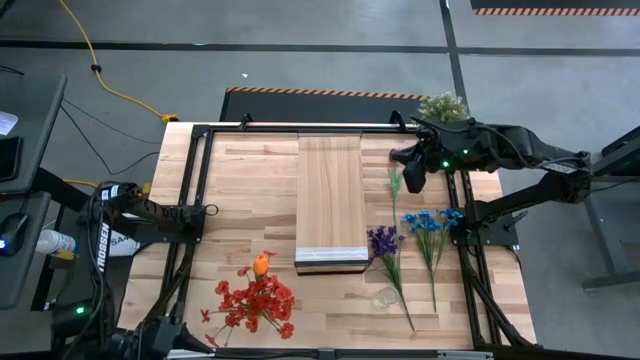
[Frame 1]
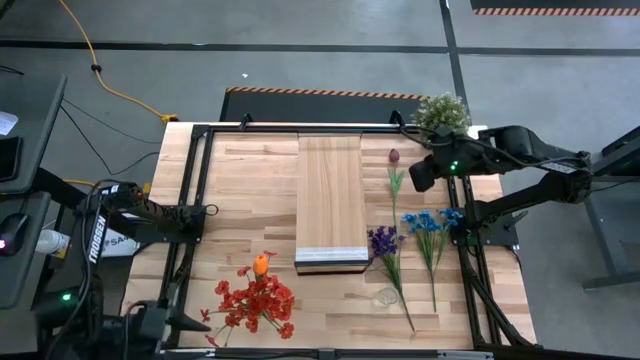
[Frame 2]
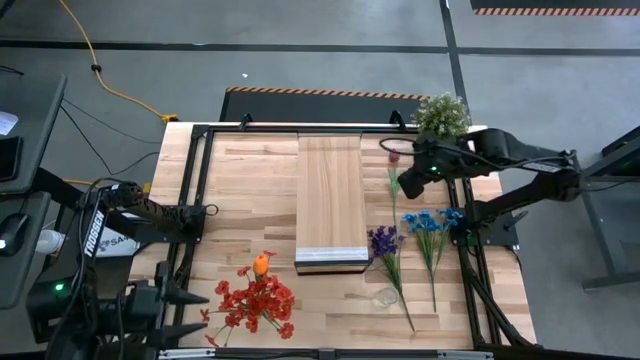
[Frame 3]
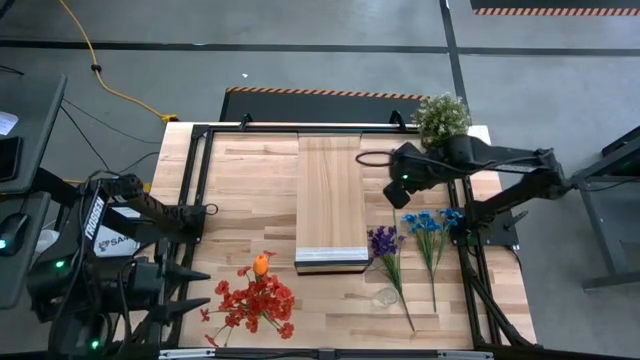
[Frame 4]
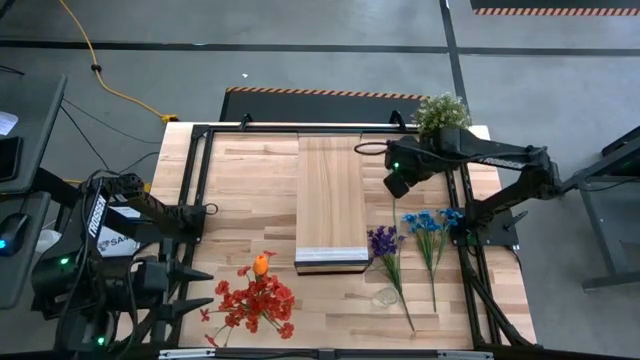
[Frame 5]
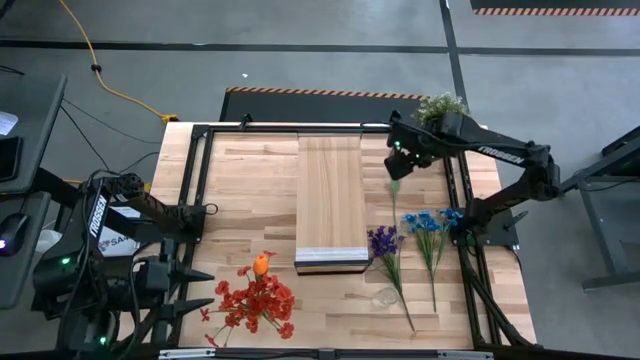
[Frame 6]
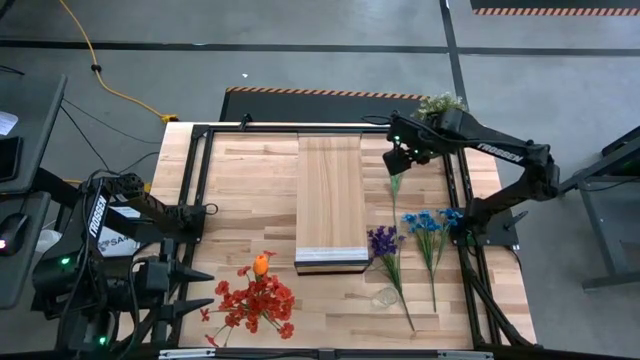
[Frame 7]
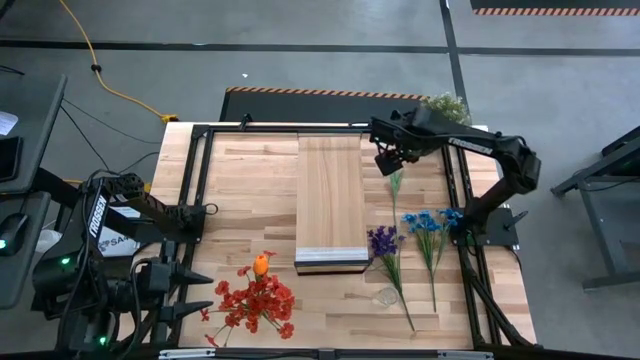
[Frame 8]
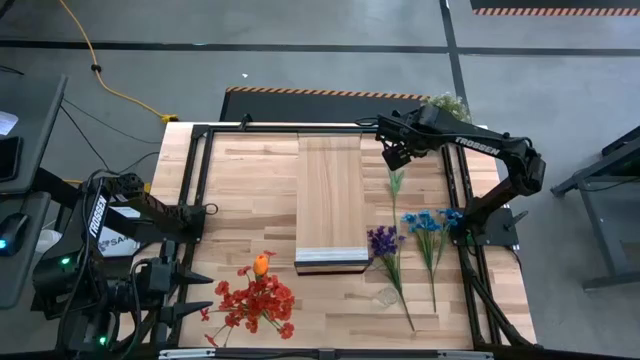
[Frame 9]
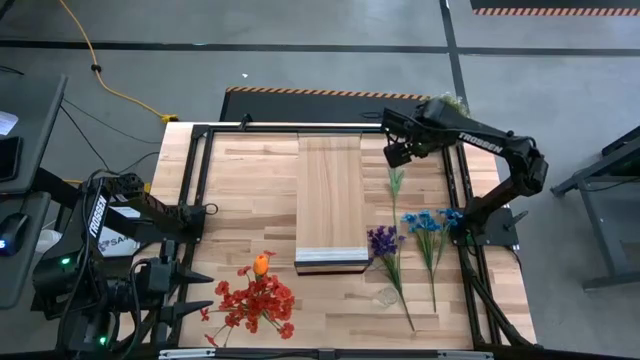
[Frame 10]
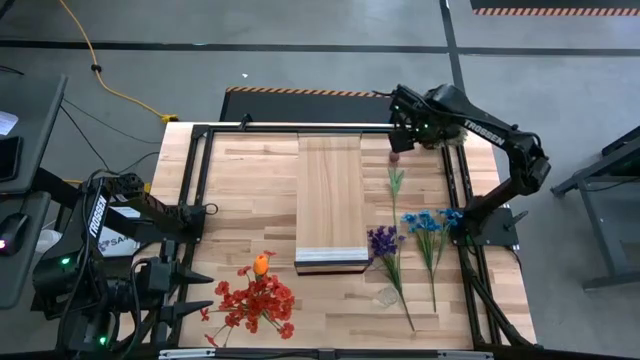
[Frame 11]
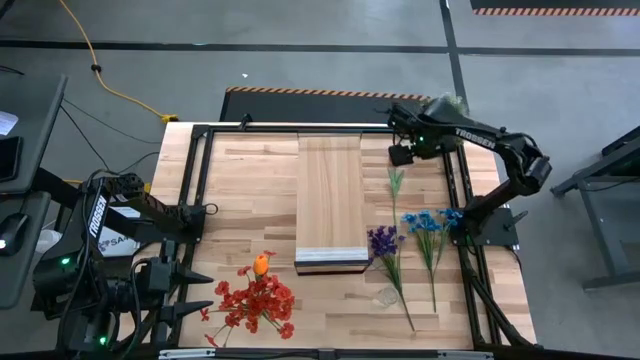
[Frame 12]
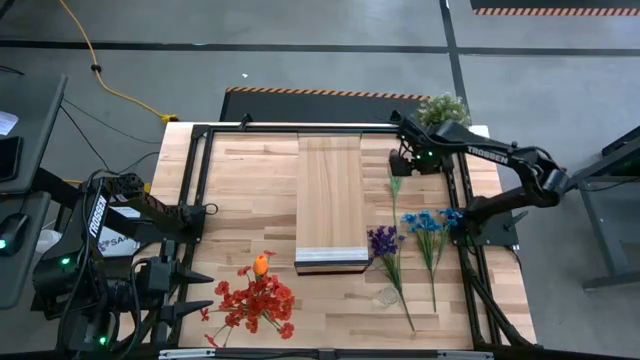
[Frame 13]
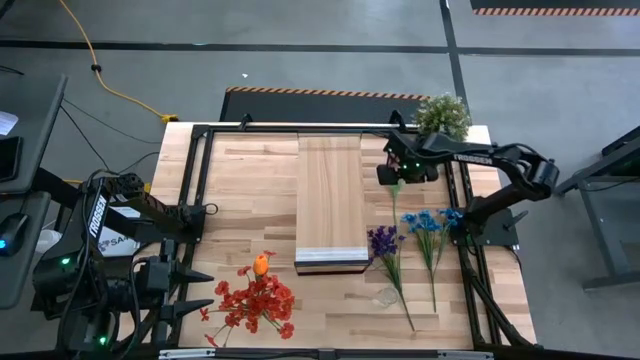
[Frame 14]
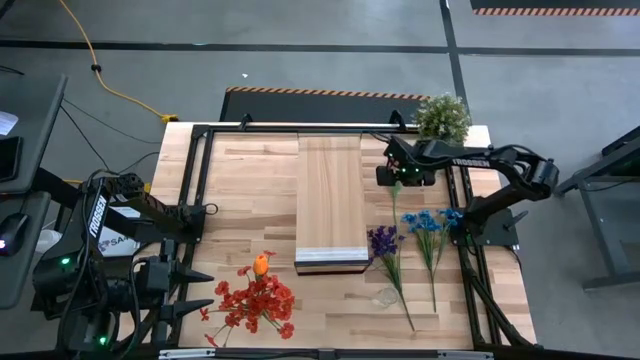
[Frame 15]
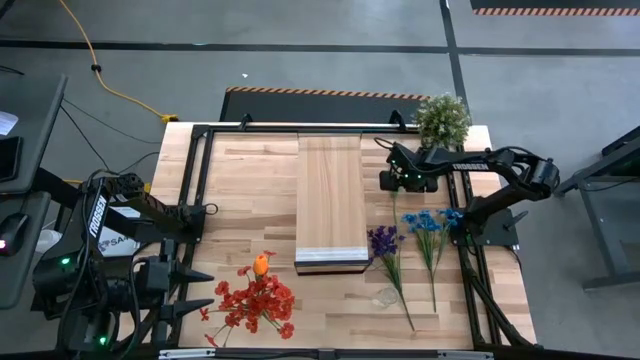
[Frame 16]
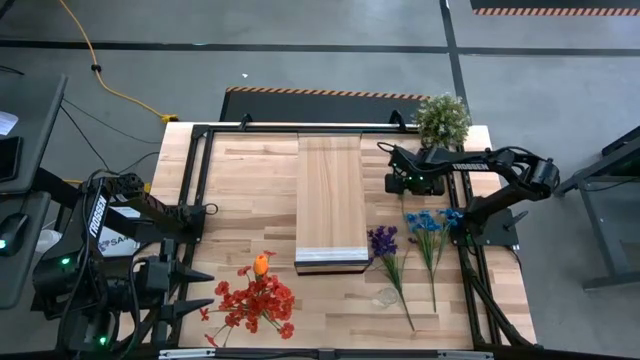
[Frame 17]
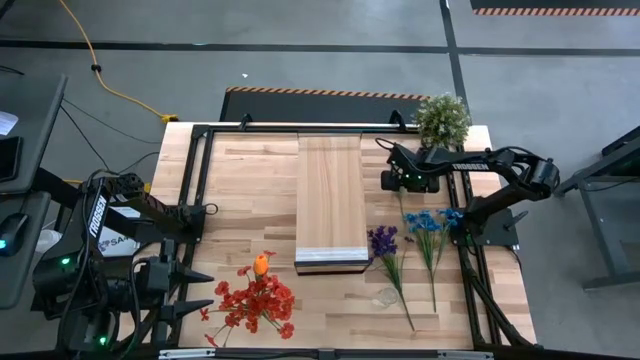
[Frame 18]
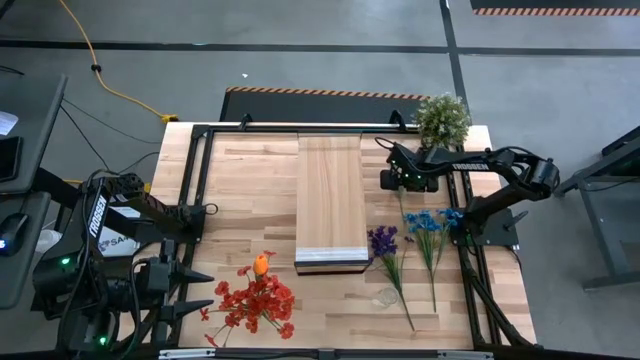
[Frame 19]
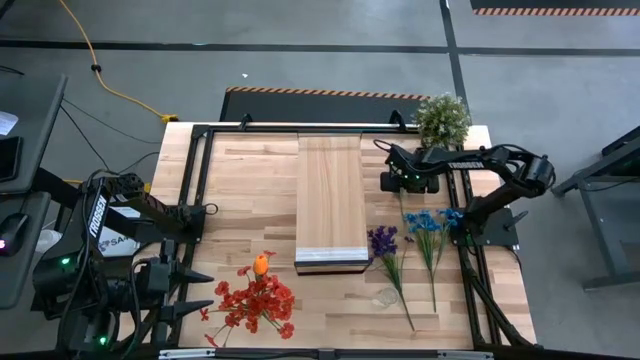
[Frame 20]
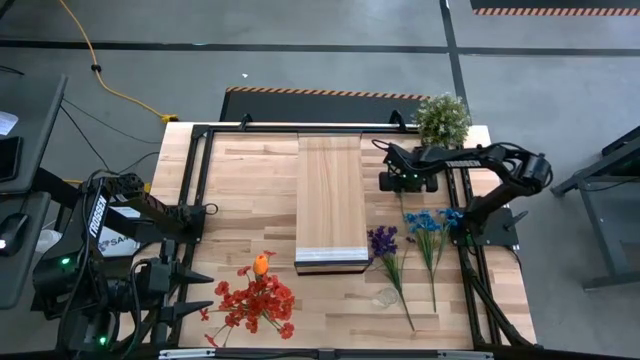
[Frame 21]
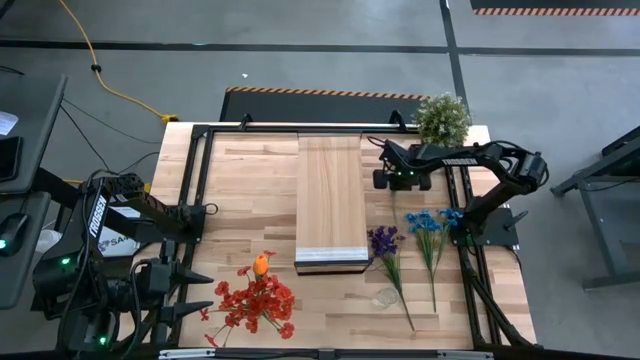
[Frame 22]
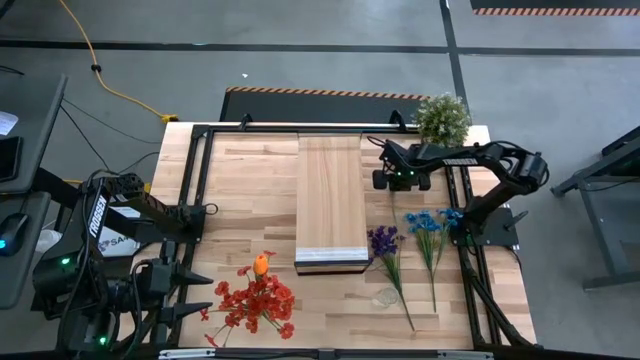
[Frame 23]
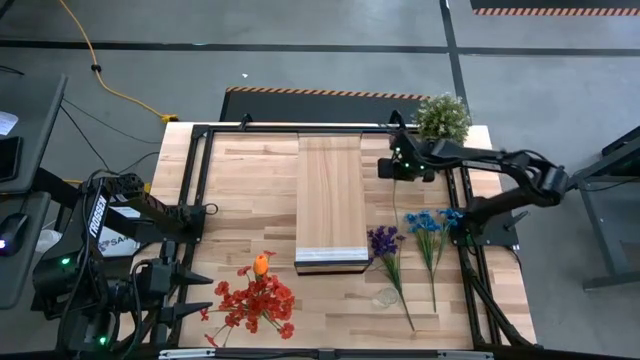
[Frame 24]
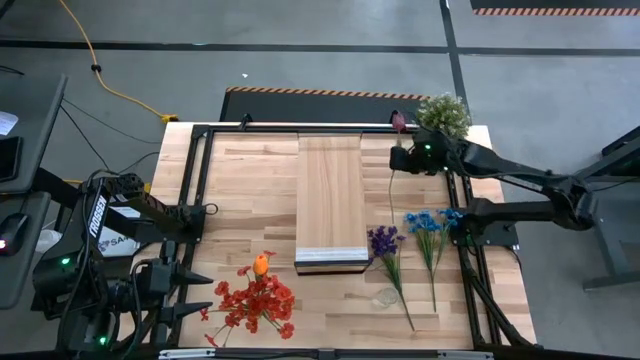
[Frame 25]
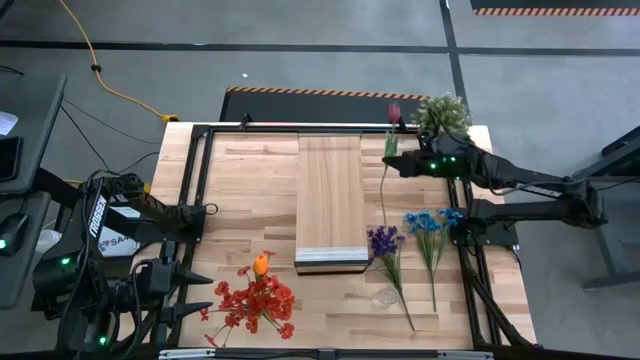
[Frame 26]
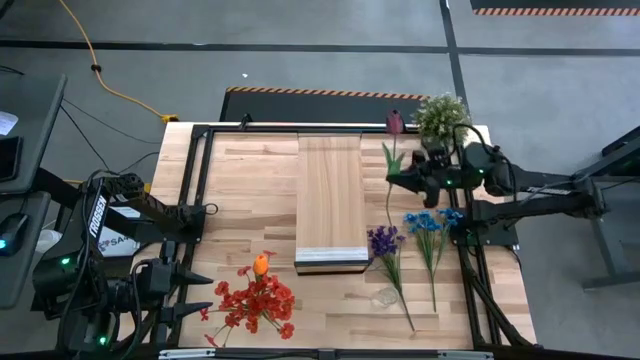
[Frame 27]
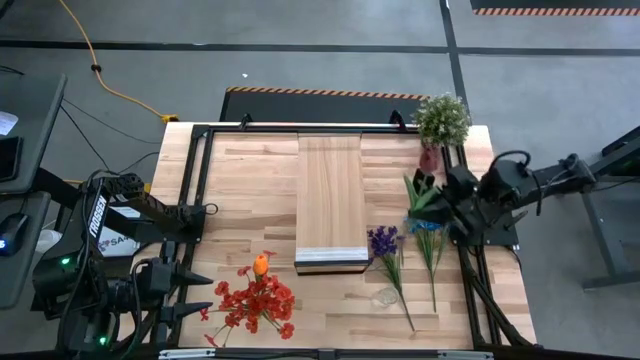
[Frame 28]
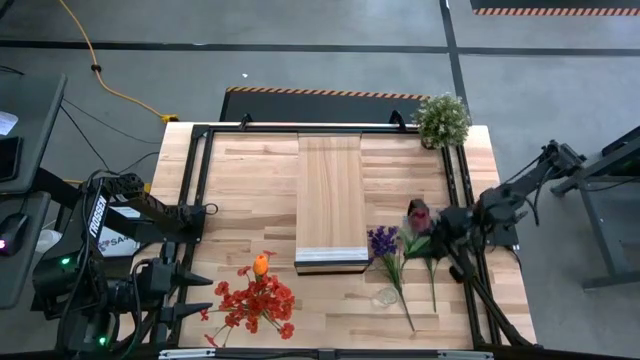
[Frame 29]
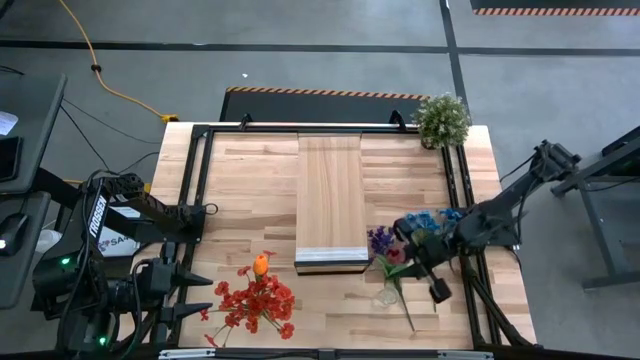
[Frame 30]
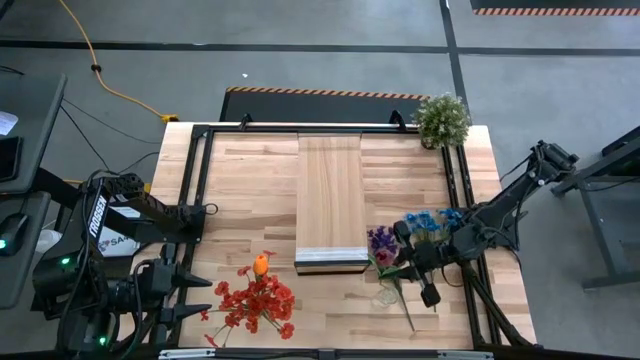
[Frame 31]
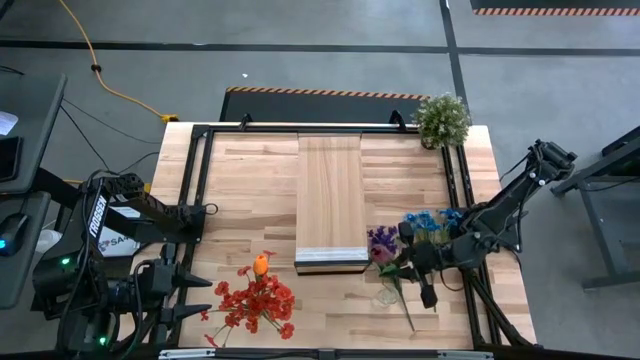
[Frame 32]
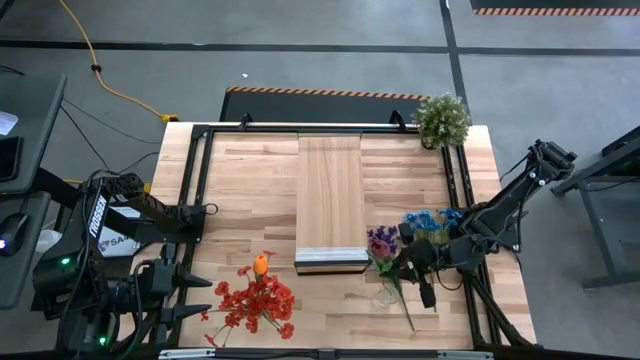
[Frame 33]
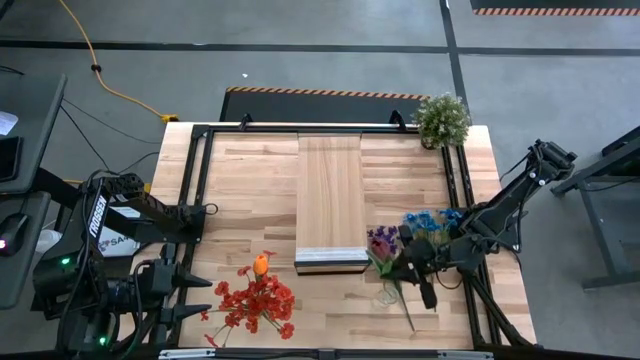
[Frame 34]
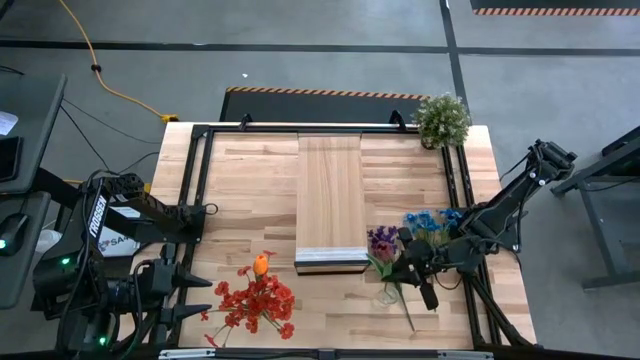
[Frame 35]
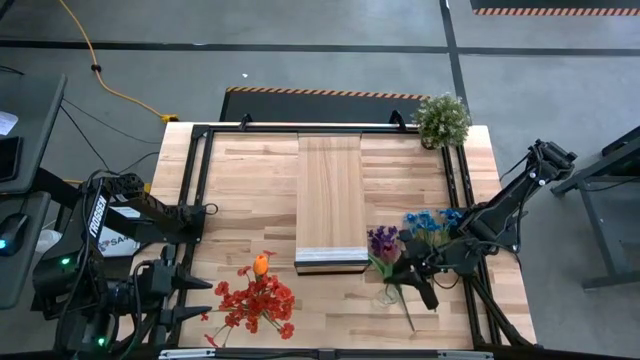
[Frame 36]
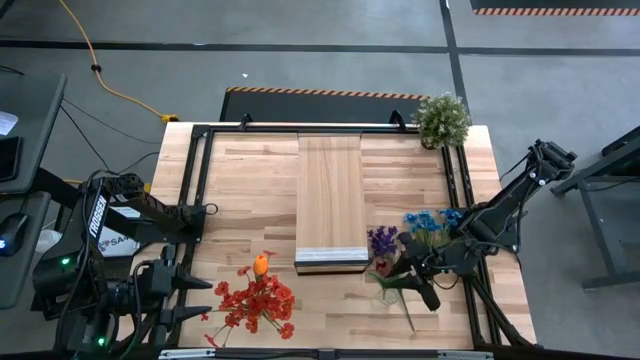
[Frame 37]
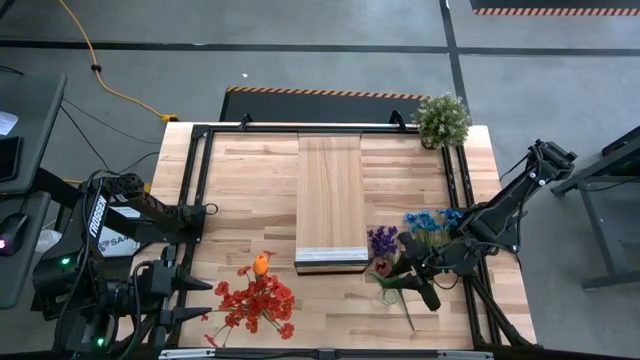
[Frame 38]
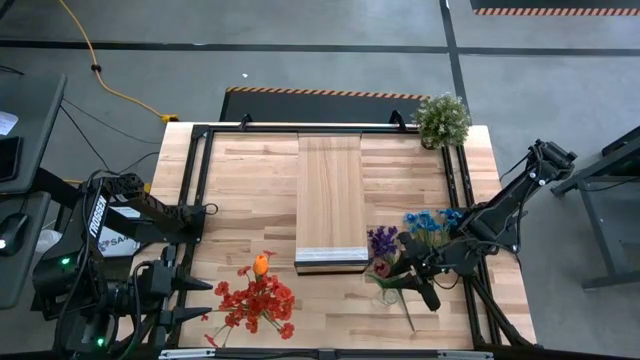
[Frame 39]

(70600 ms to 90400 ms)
Task: Pick and place flowers into a vace then onto a shelf
Put the dark red flower into the right transparent vase

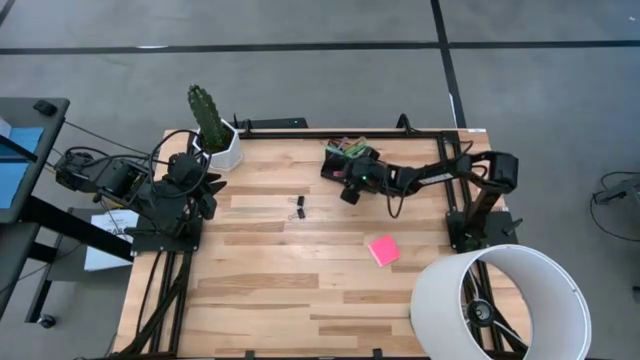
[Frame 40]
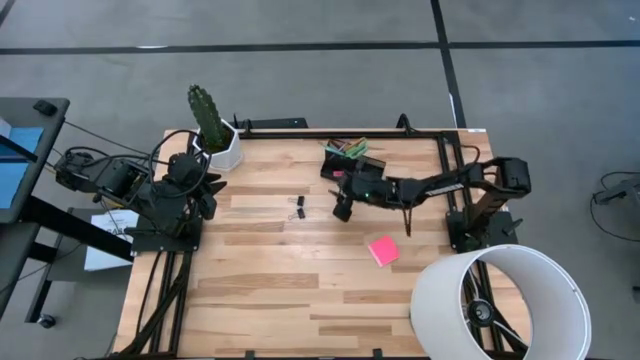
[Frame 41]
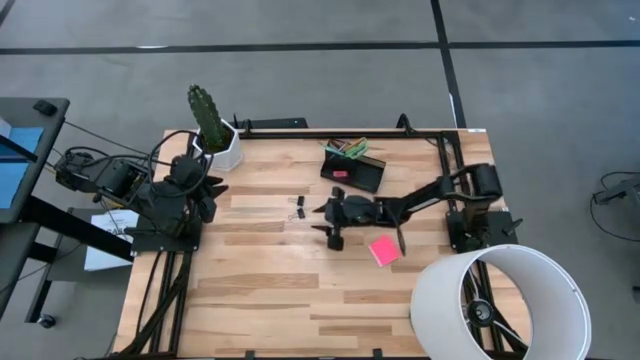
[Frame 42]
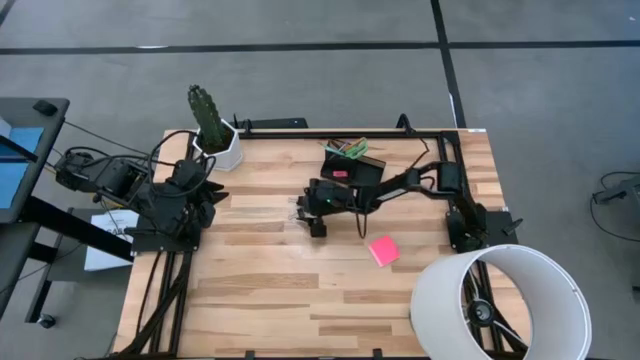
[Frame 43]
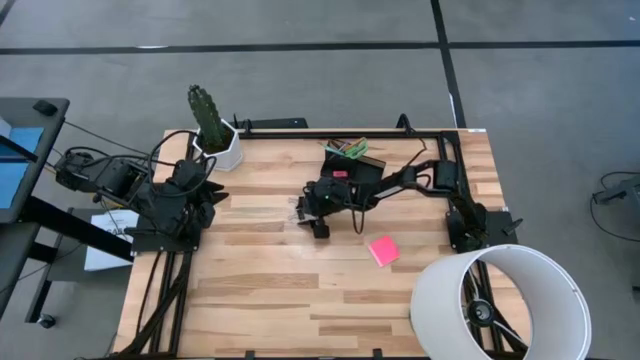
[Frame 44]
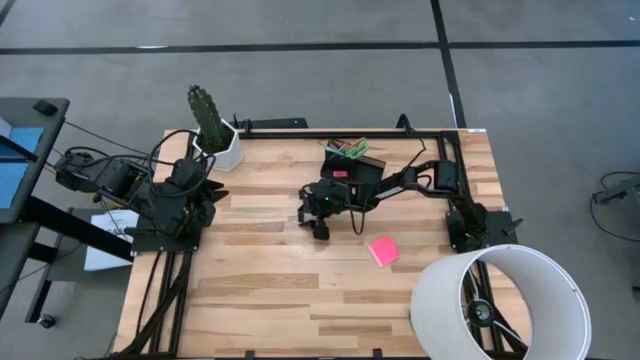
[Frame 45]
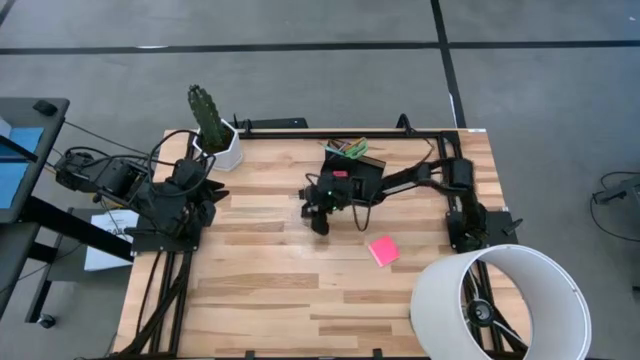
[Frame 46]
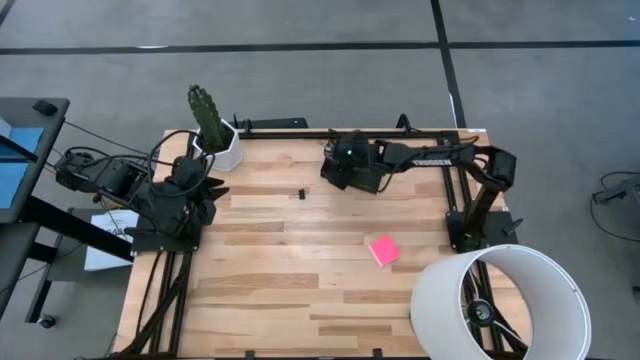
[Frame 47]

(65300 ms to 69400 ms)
Task: Pick and place office supplies into organizer
Put the bottom black binder clip into the black desk organizer
